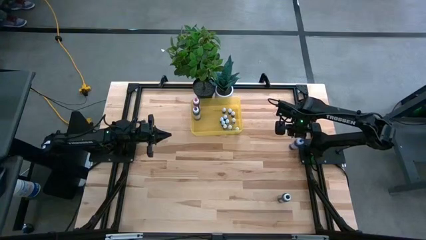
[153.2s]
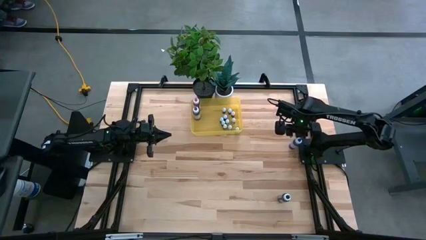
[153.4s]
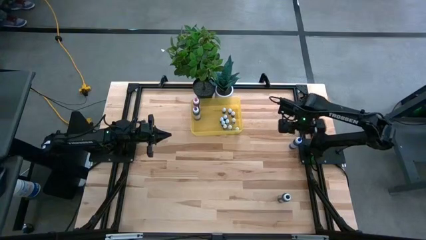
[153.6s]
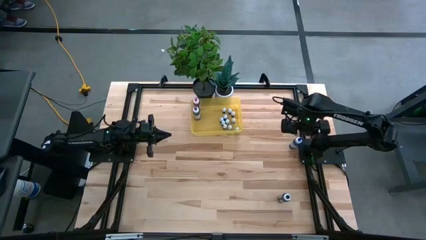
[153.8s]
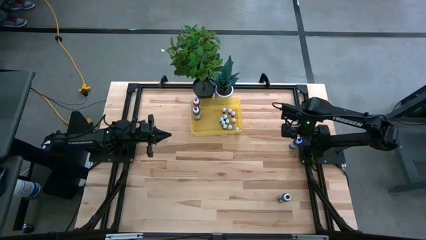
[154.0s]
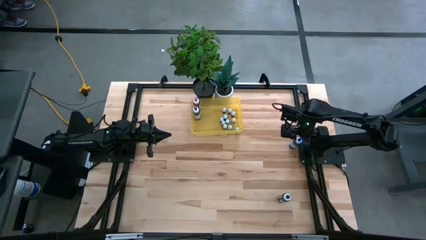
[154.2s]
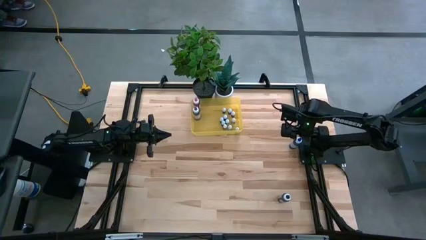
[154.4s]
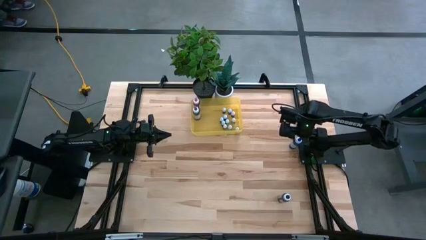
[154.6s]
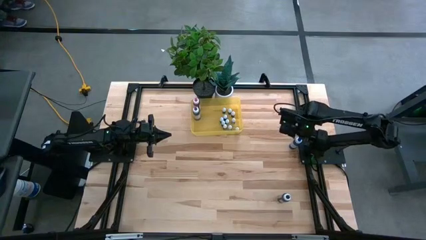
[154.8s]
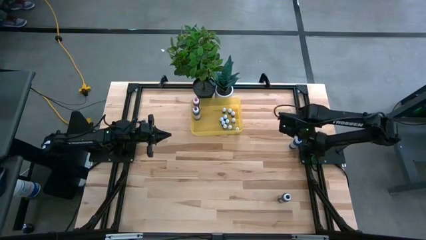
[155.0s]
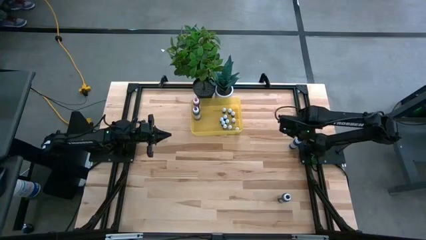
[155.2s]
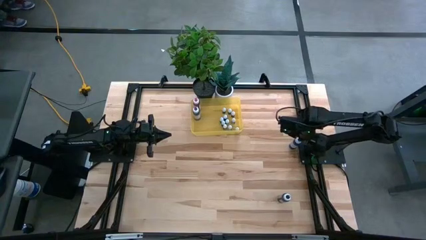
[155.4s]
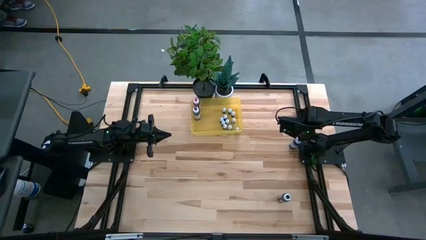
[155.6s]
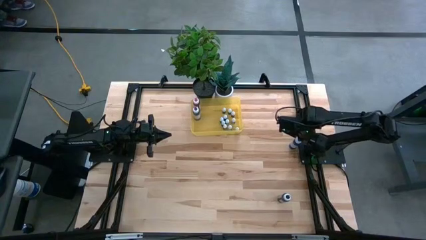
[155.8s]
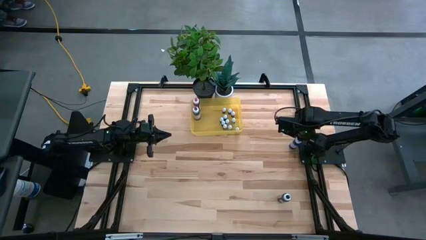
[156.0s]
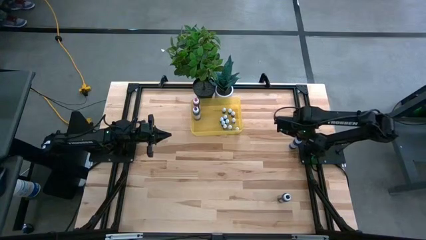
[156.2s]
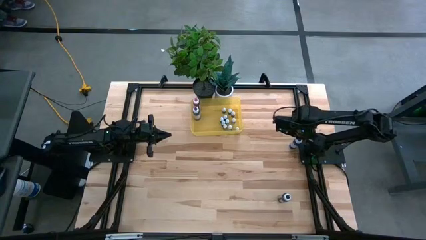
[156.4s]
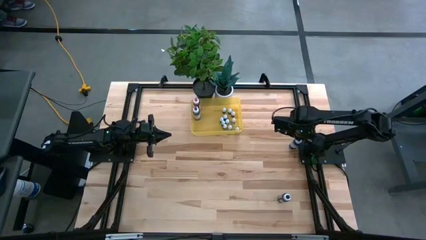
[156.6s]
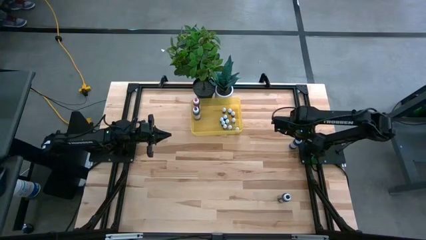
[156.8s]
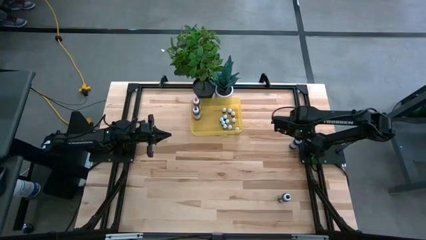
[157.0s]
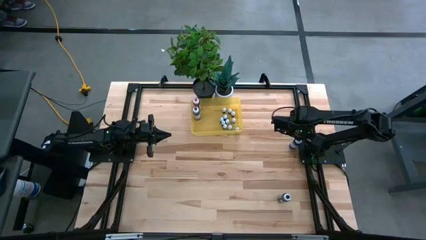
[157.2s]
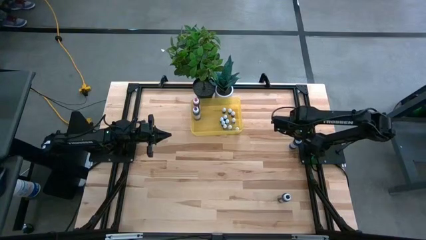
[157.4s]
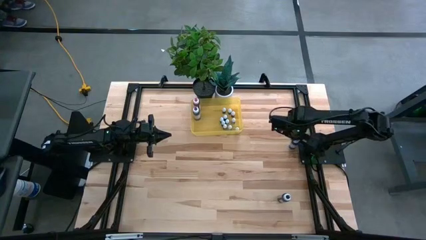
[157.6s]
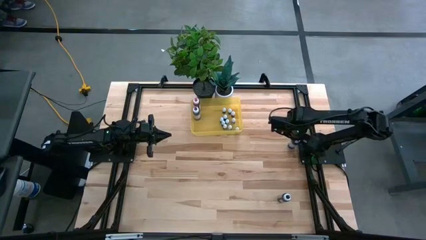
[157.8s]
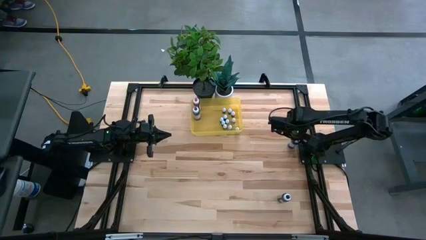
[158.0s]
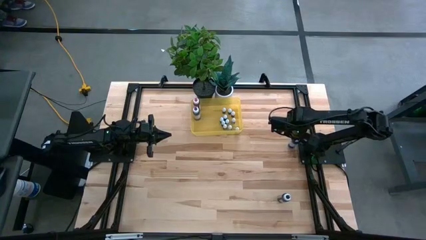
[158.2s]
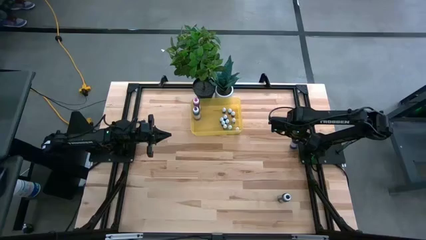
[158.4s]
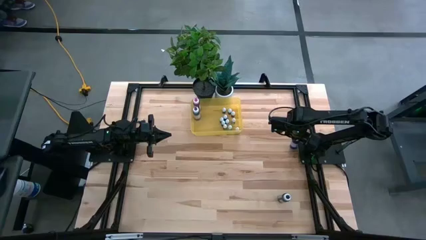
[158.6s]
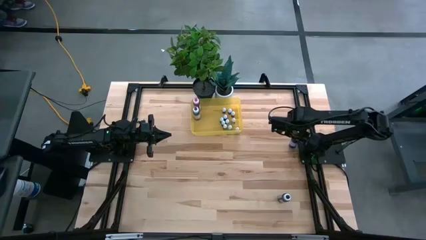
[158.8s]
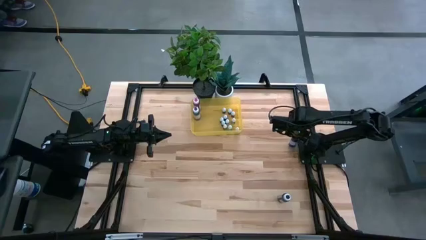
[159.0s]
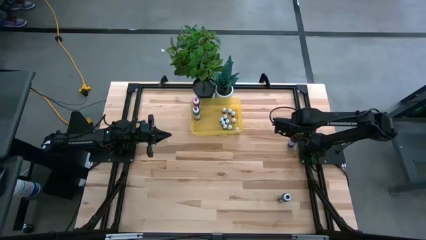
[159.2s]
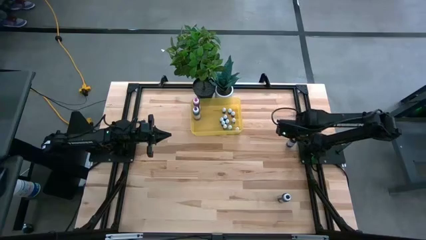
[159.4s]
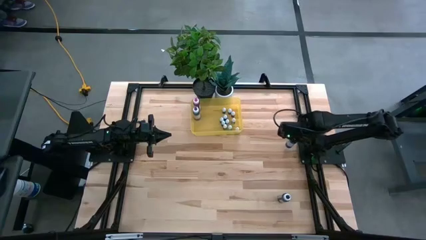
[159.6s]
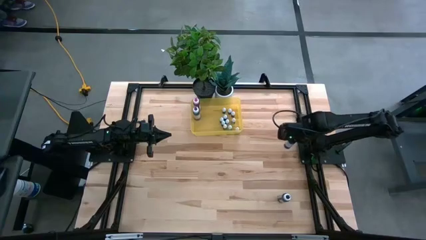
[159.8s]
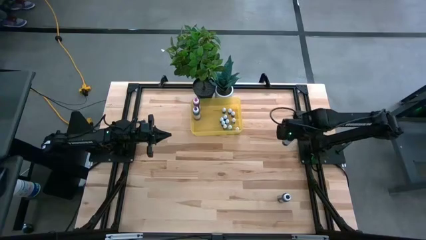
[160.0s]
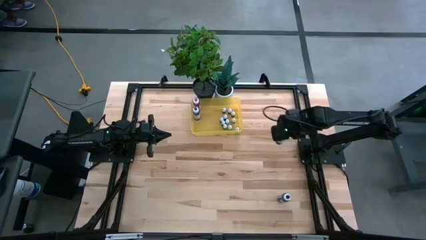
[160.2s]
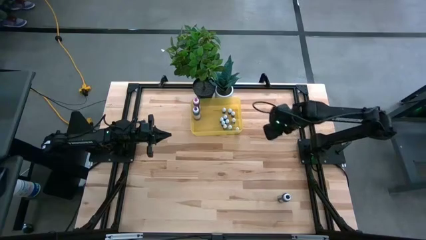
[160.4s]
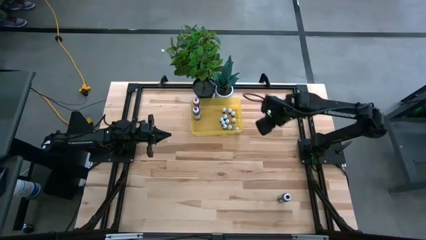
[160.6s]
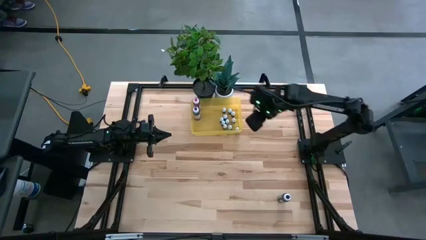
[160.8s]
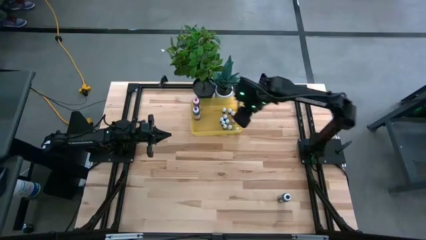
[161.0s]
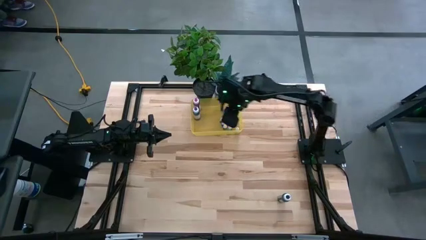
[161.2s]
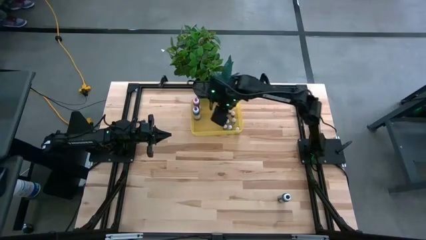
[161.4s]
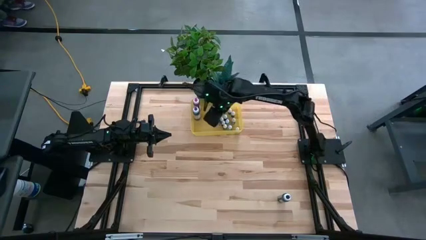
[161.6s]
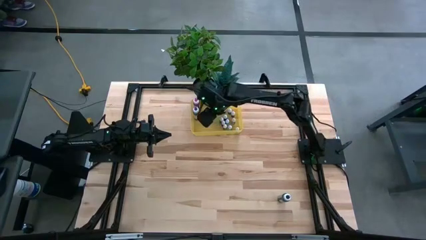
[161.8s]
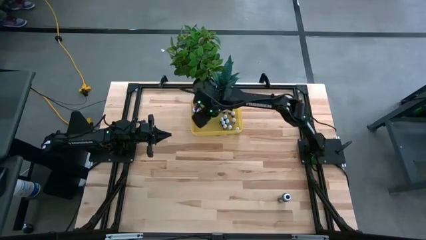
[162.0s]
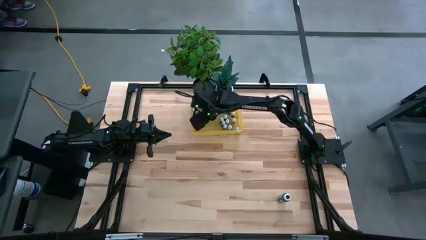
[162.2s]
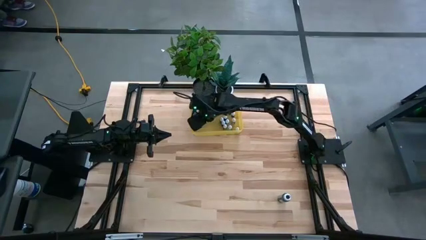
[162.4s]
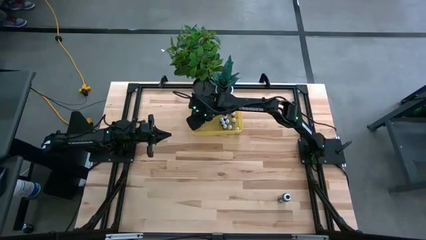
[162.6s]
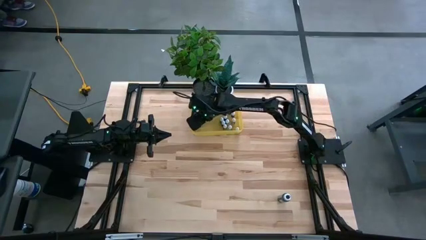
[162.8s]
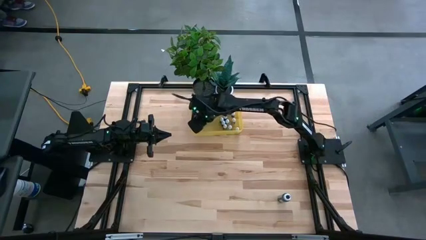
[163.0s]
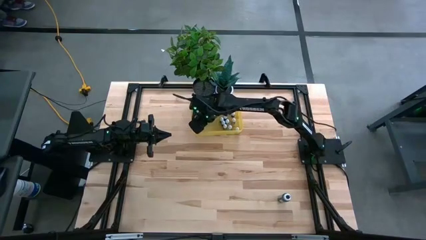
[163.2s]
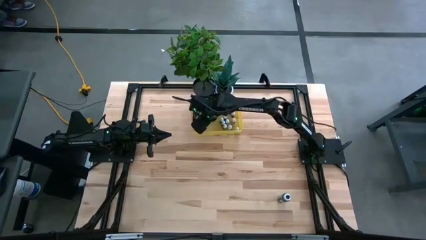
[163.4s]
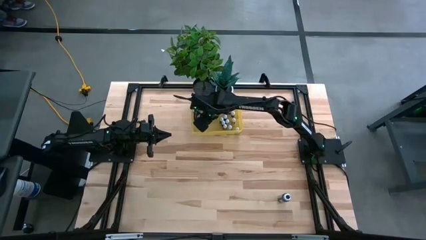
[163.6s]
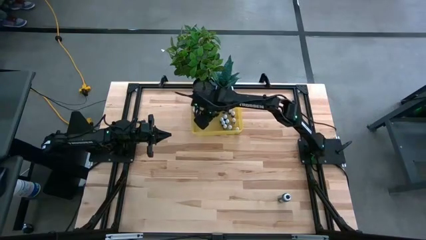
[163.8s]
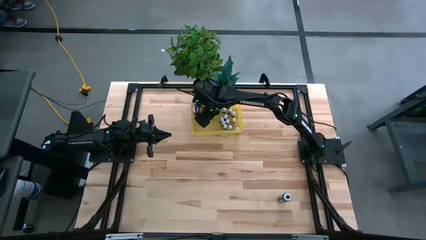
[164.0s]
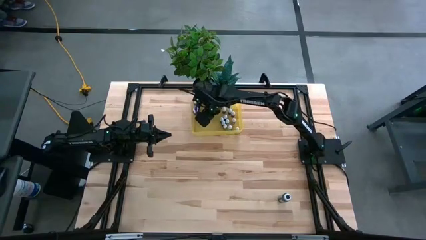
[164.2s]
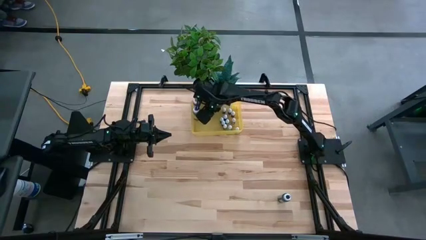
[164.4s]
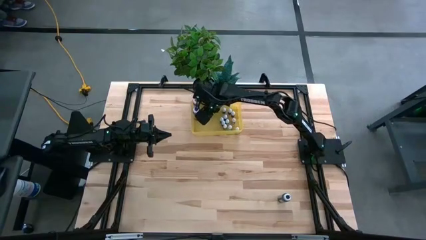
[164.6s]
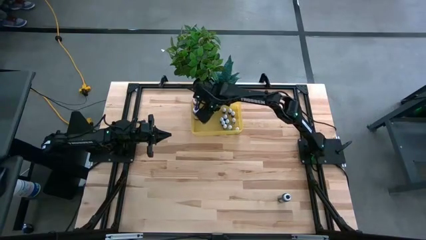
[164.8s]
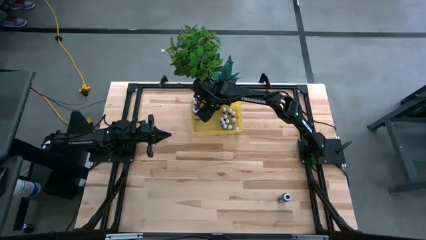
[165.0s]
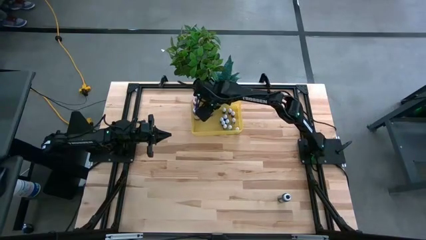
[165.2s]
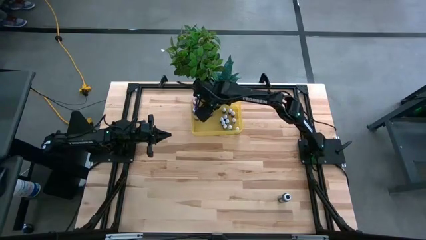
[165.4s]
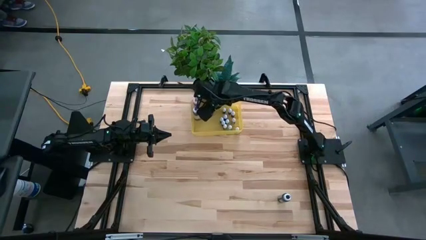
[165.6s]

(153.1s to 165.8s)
Task: Pick & Place food coloring
Put the large blue food coloring bottle into the yellow bin

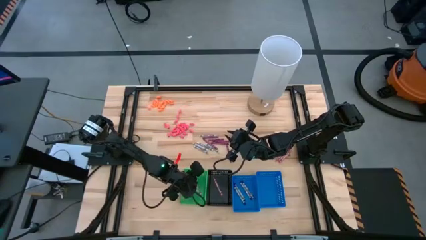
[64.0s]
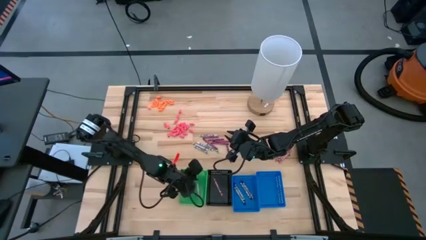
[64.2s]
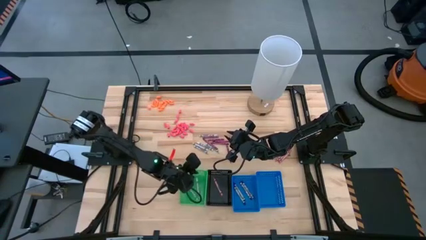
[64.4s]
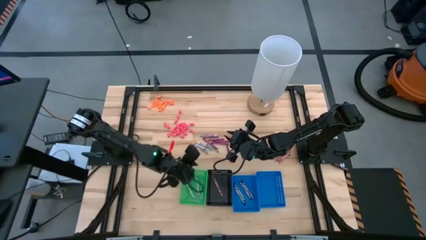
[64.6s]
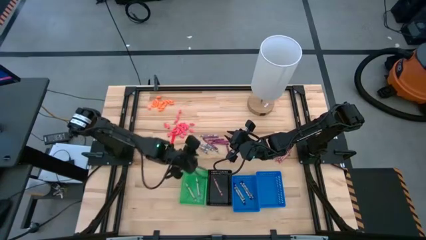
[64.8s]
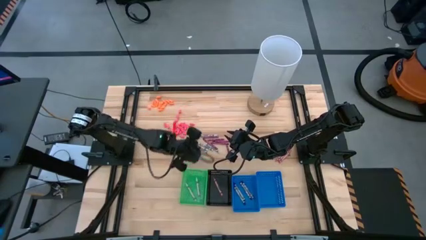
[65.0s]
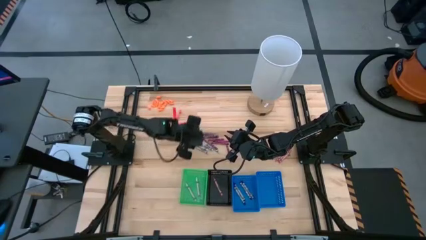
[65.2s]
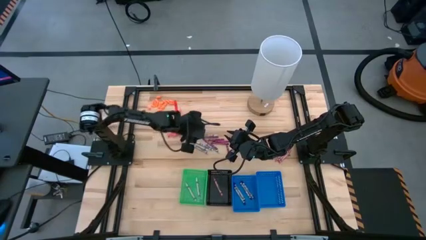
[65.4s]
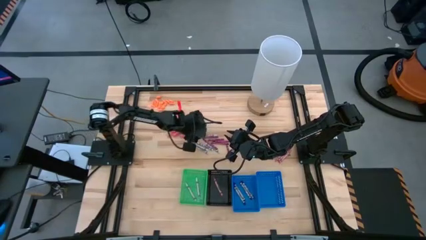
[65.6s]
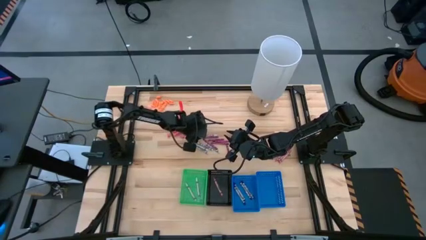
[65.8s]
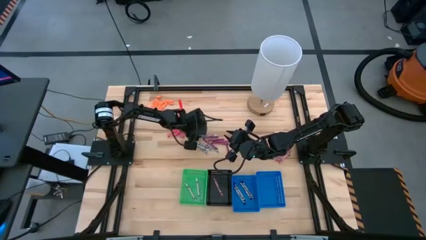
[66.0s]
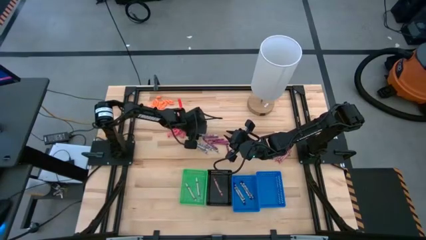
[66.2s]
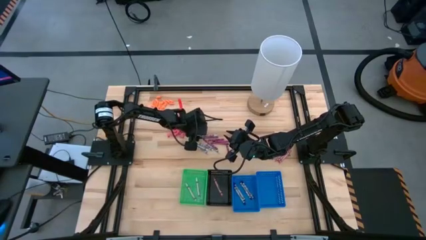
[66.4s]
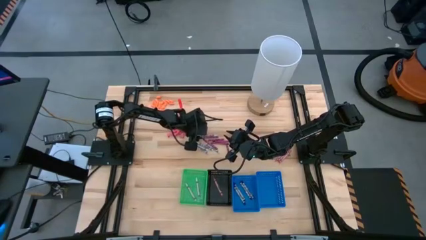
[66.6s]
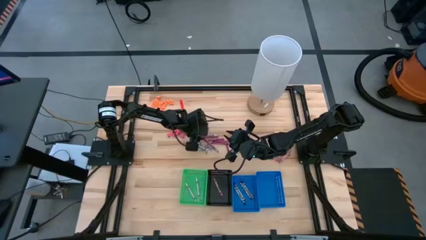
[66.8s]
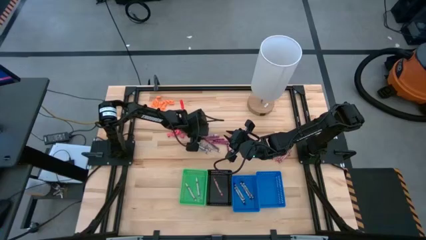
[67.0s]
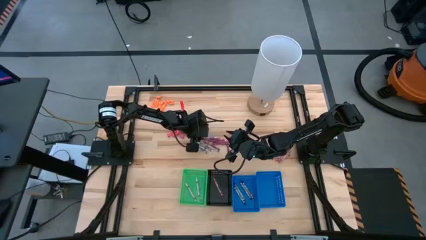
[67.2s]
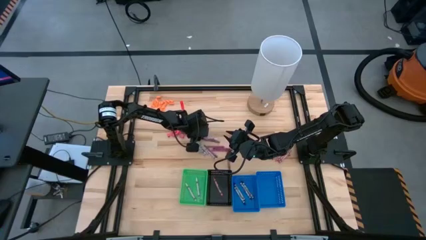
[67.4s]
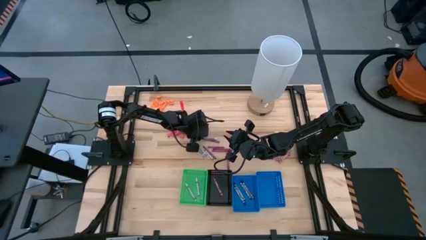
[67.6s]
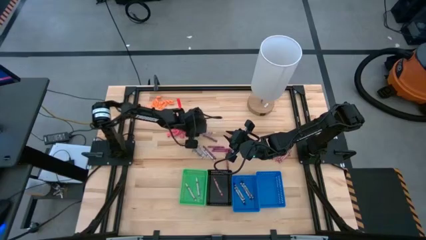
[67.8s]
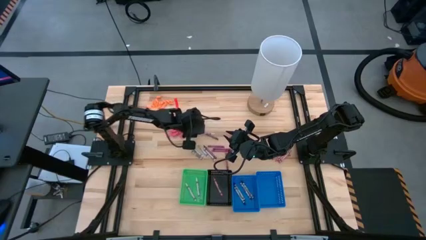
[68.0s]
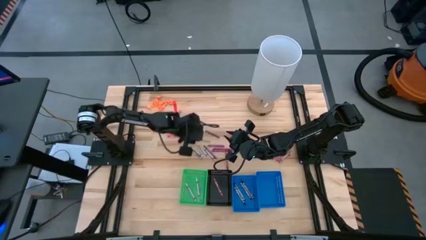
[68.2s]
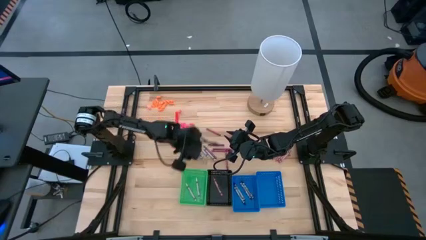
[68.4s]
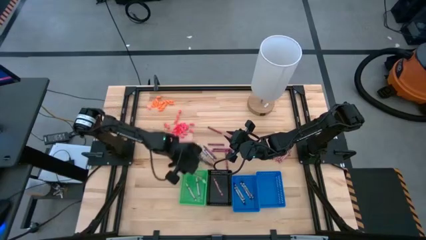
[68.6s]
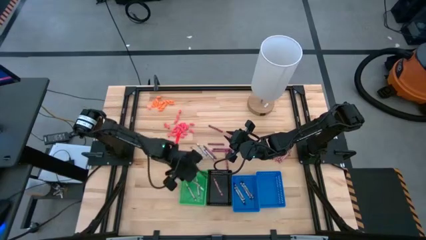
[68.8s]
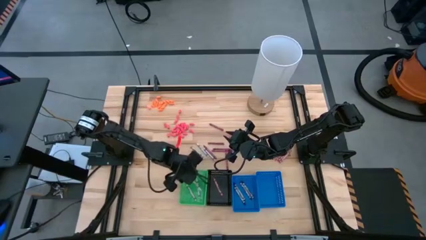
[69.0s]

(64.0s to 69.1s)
Task: Sort crayons
Put the white crayon into the green bin
